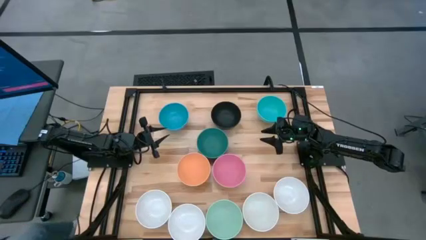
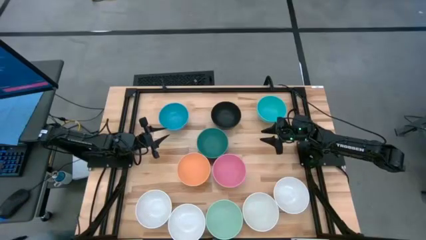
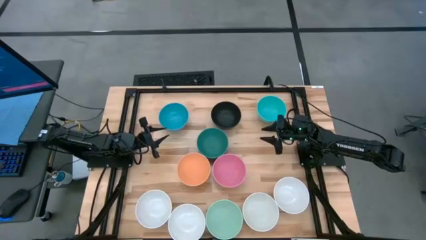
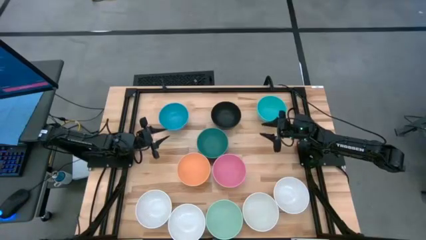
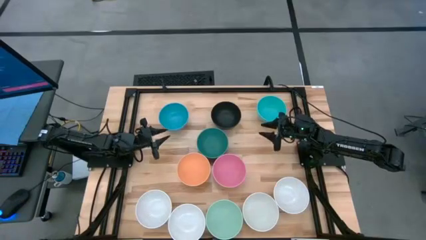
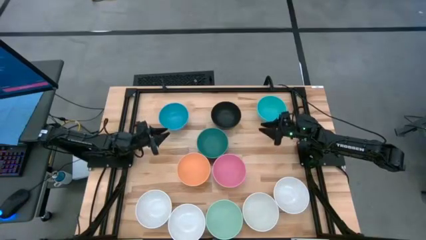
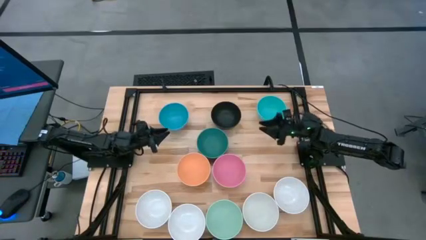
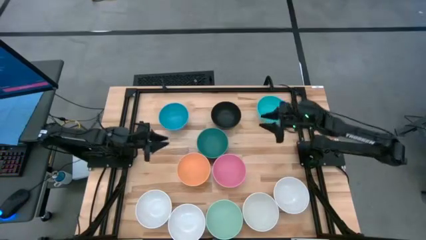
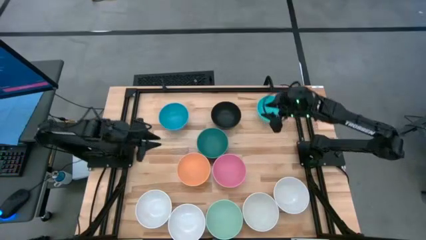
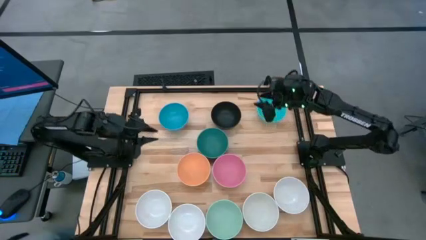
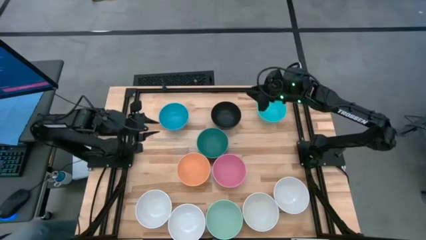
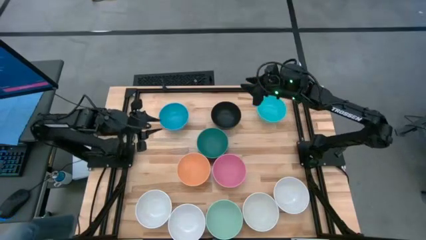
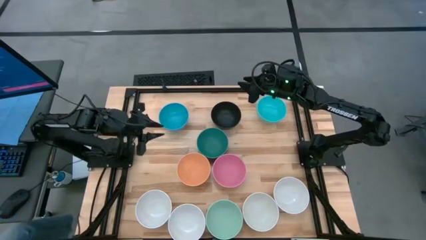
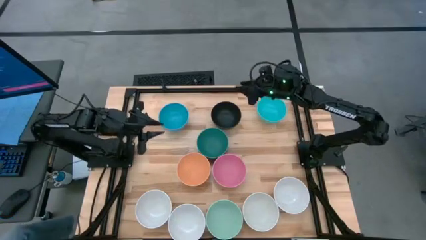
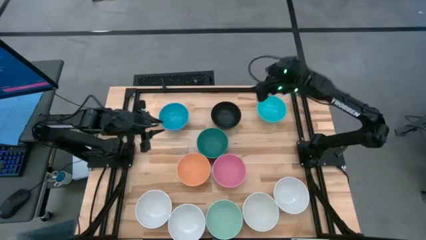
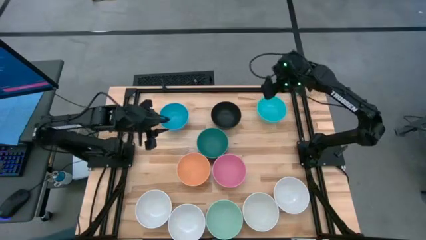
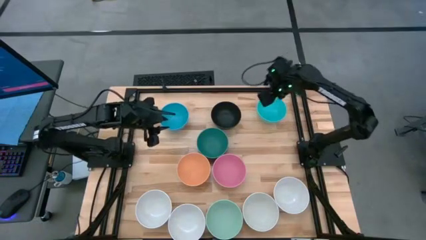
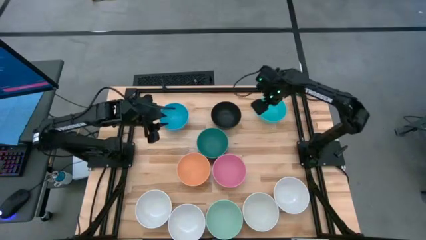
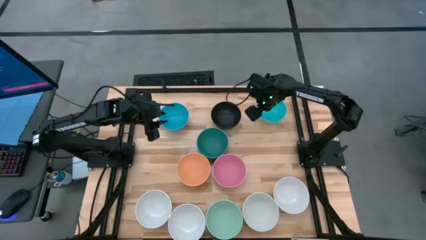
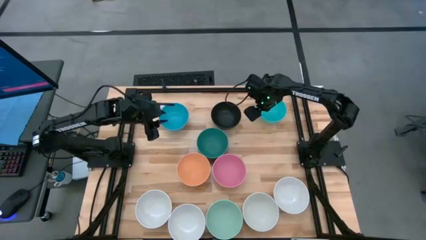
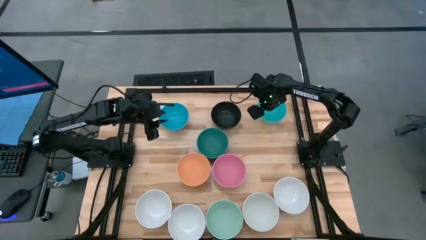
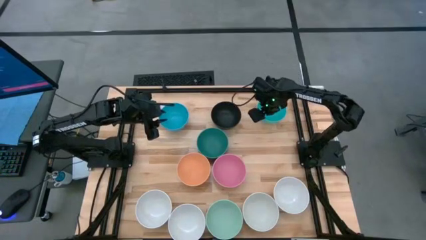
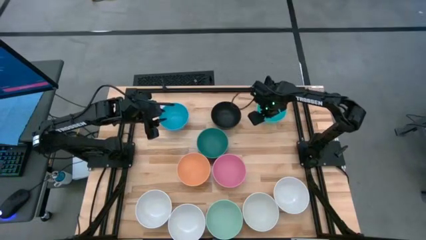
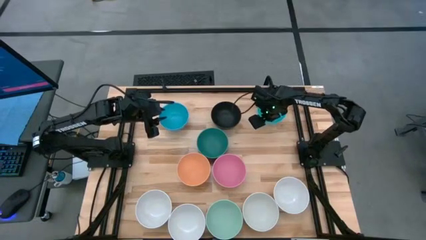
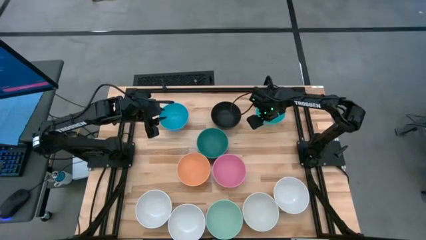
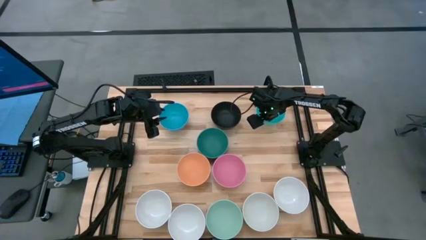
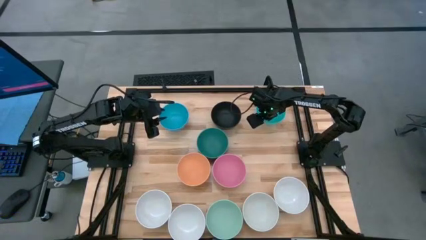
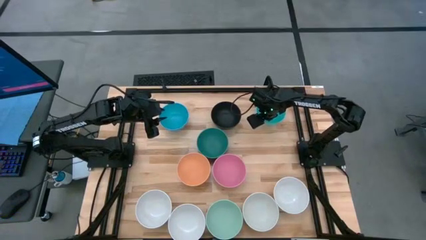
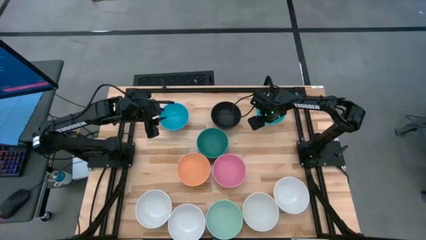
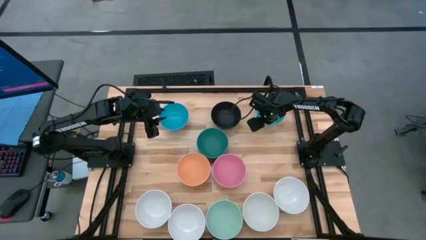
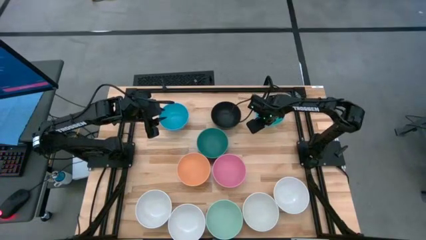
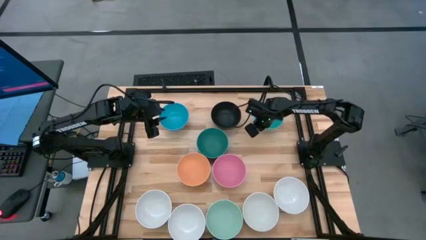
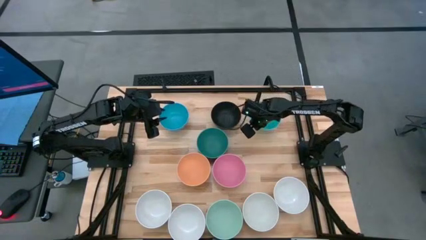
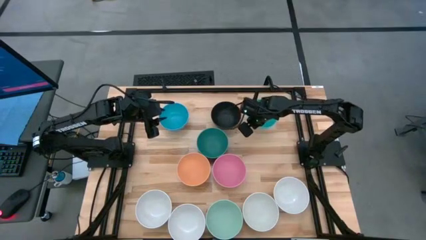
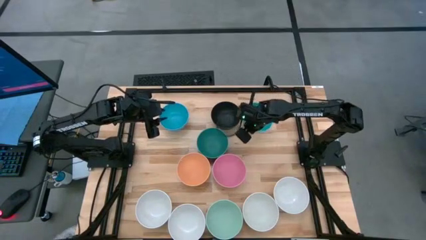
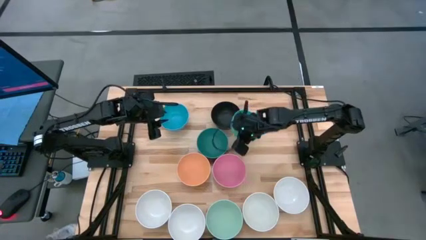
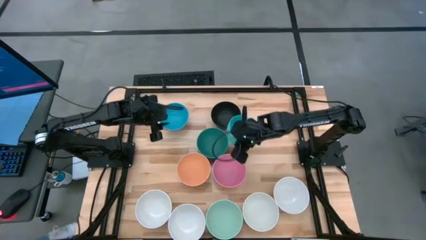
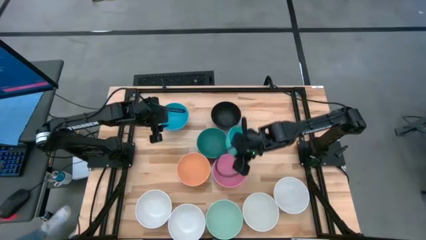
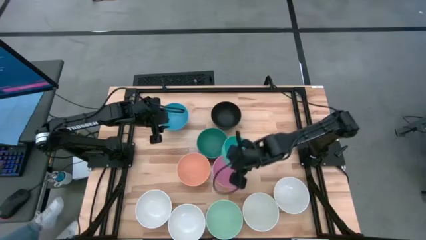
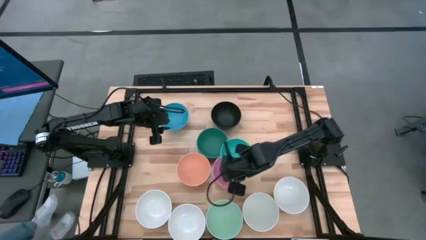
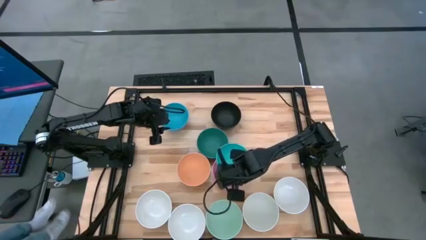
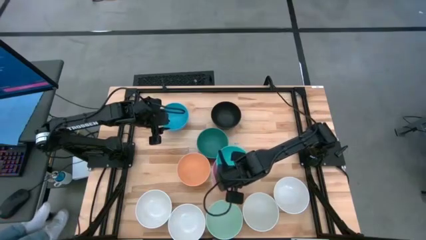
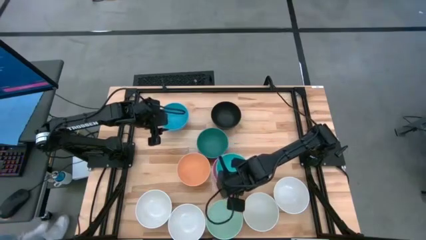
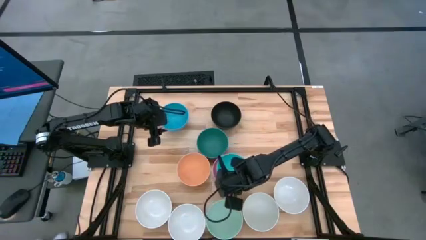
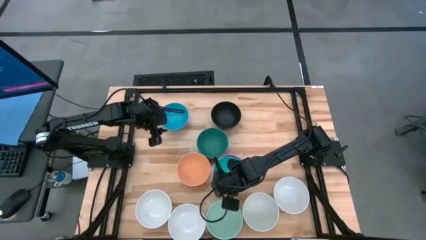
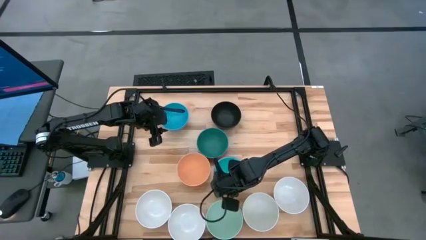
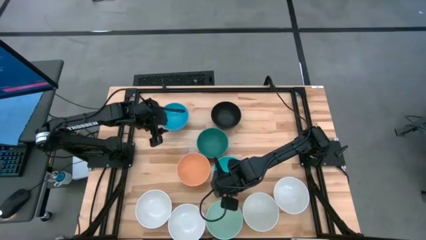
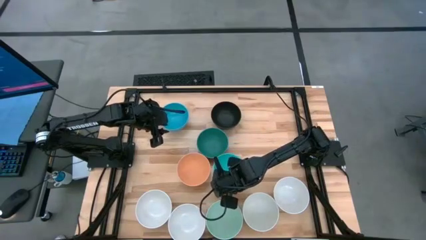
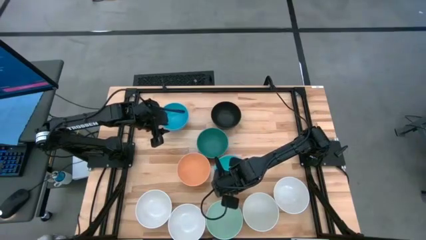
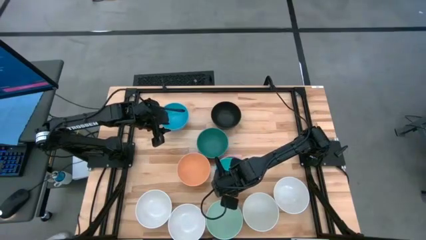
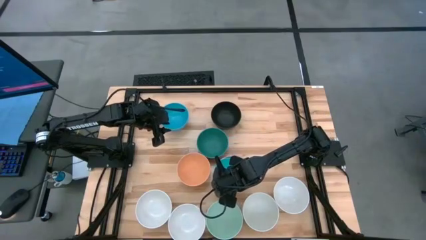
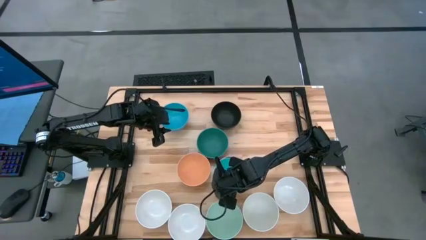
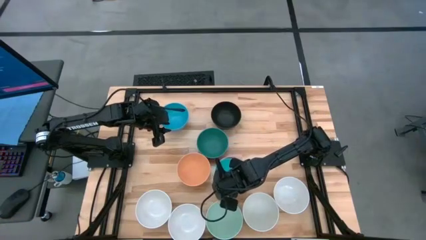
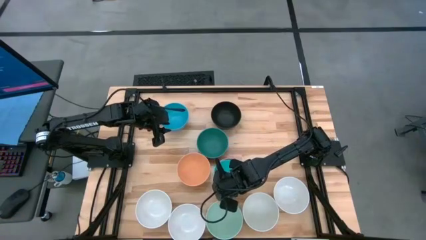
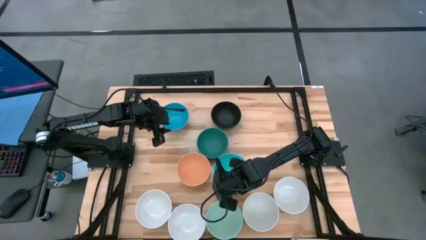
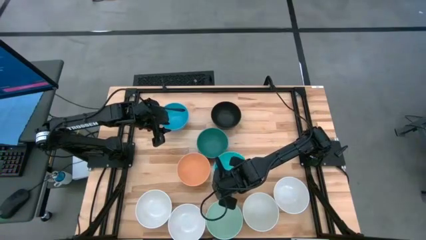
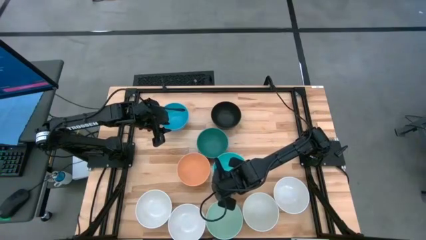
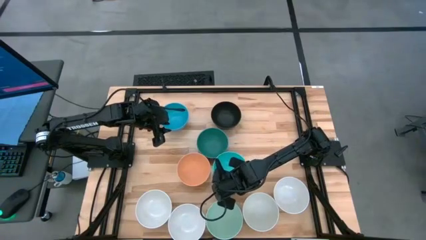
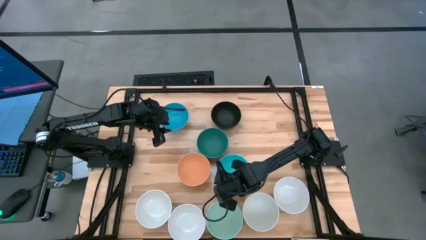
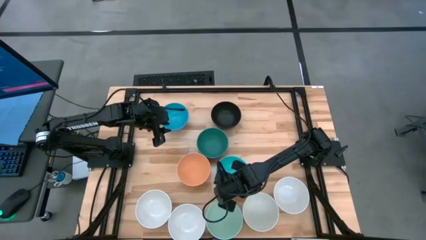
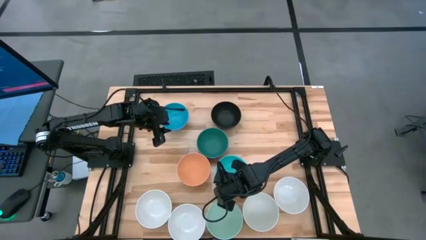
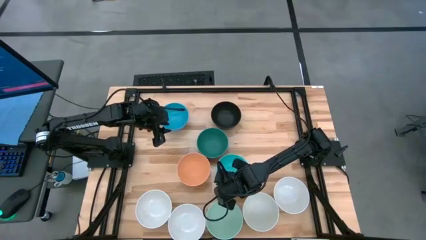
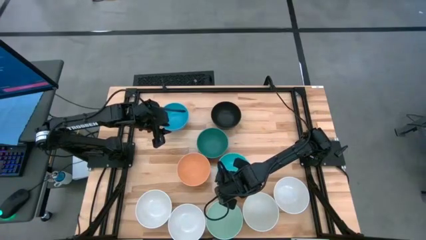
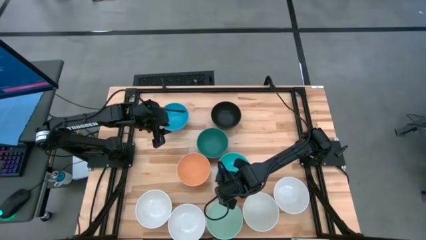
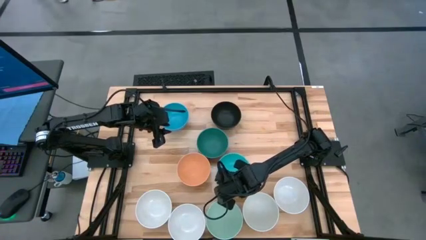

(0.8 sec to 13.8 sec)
Task: Nest bowls inside each other
Stack the light blue bowl on the pink bowl
